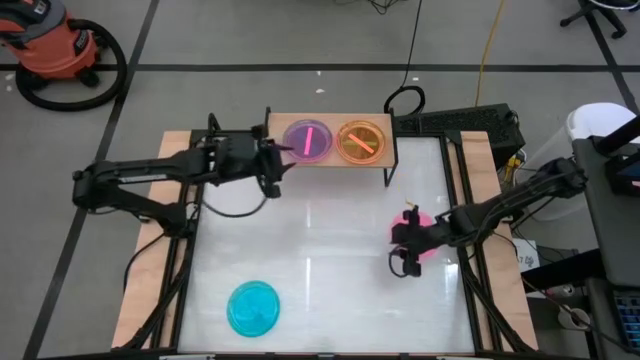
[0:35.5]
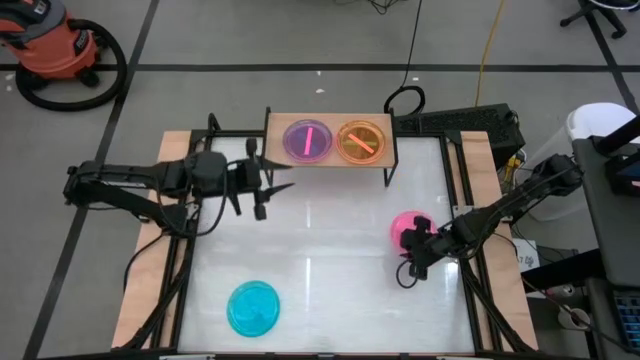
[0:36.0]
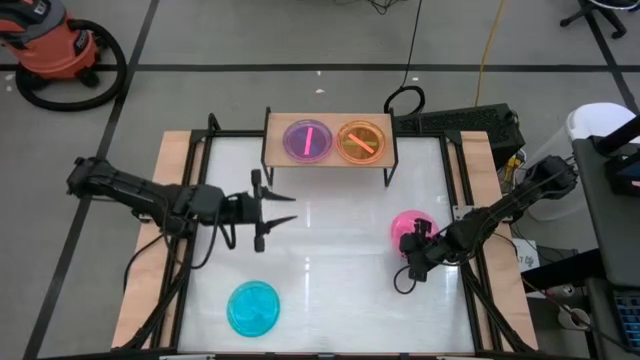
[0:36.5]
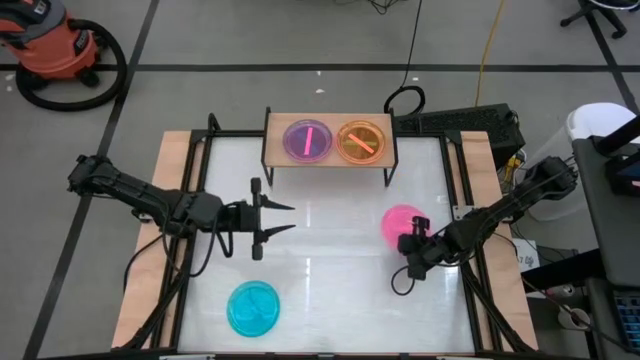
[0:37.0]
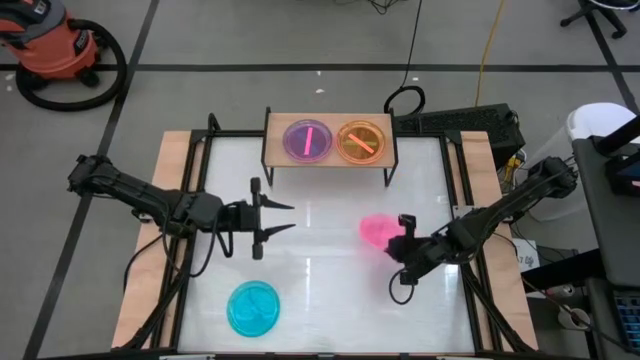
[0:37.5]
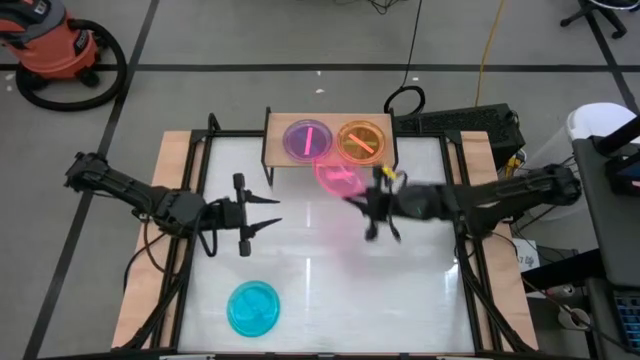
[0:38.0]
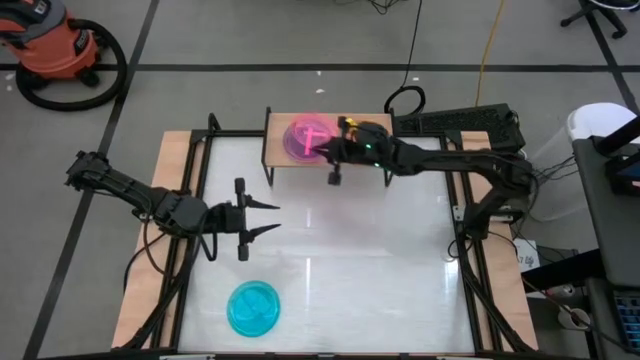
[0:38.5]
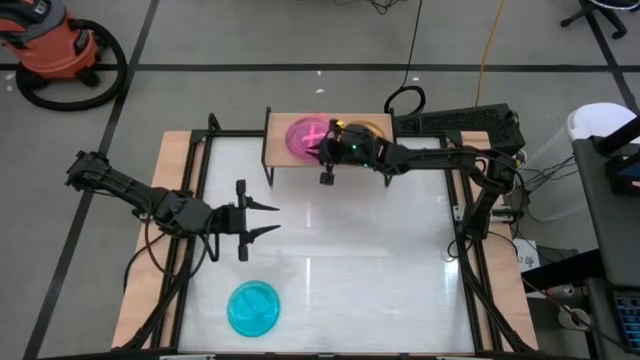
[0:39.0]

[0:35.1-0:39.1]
Task: Place and stack plates onto a shelf
Stack the pink plate on top of the pink plate on the shelf

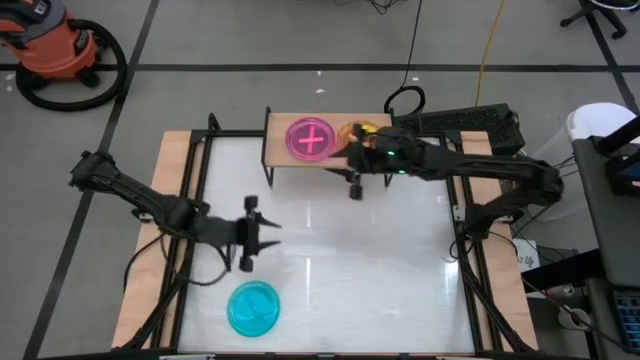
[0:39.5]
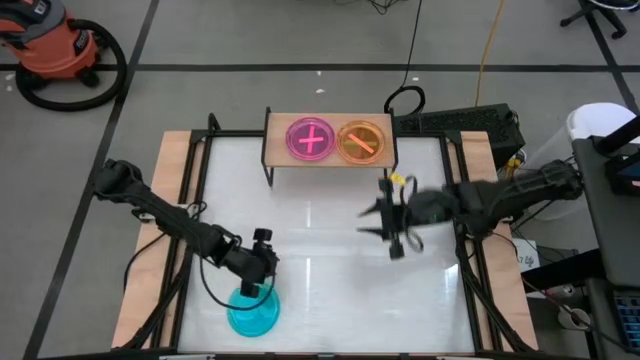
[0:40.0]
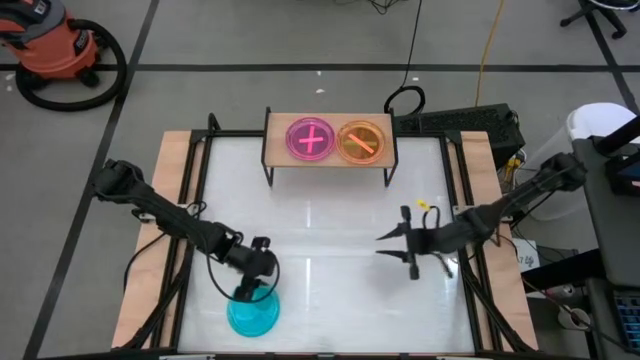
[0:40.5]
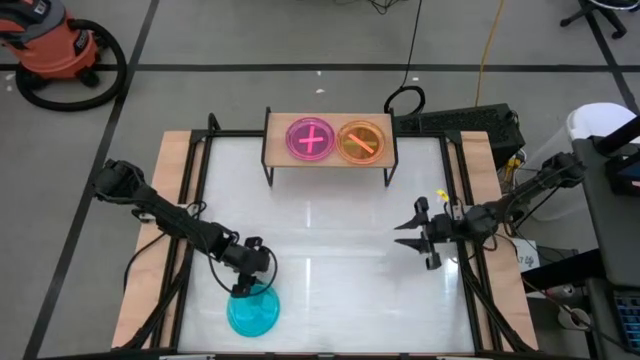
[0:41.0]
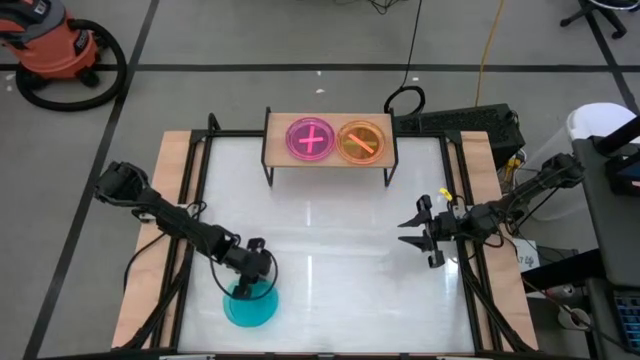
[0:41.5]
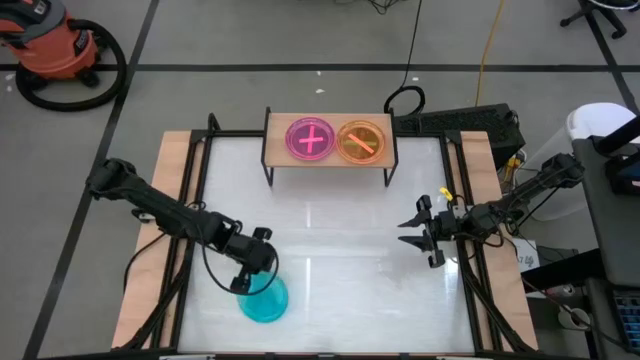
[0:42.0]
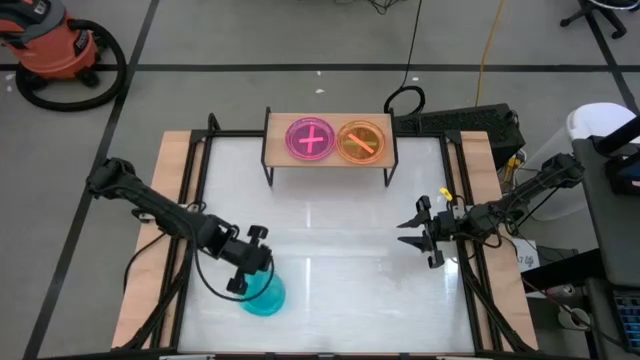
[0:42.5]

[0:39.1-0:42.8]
Stack the blue plate on top of the pink plate on the shelf

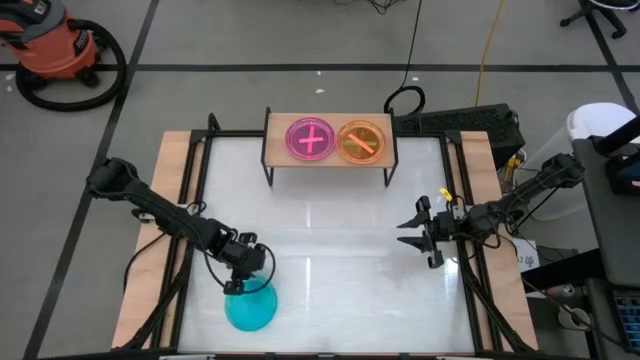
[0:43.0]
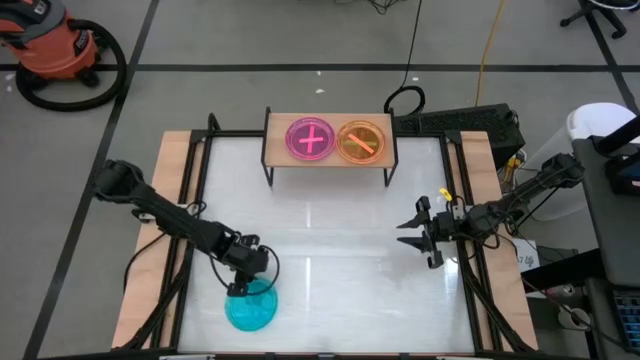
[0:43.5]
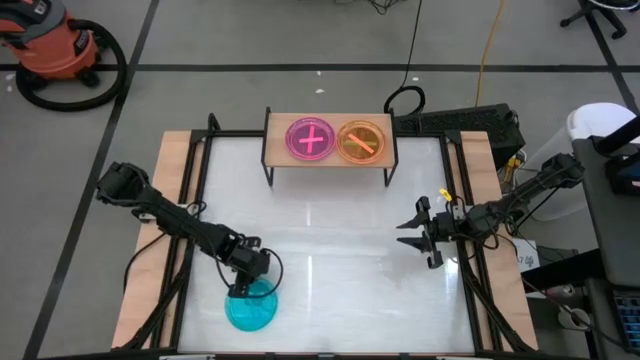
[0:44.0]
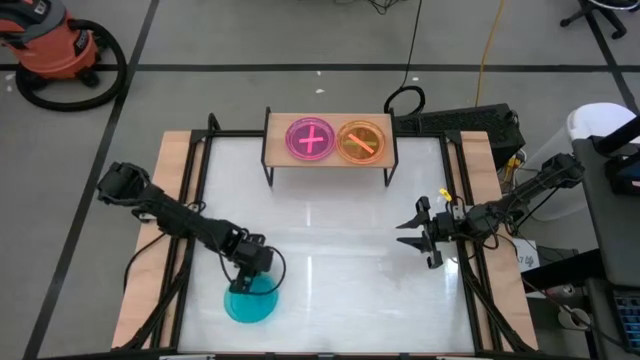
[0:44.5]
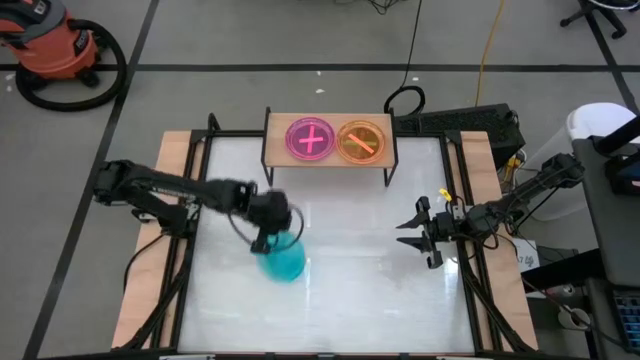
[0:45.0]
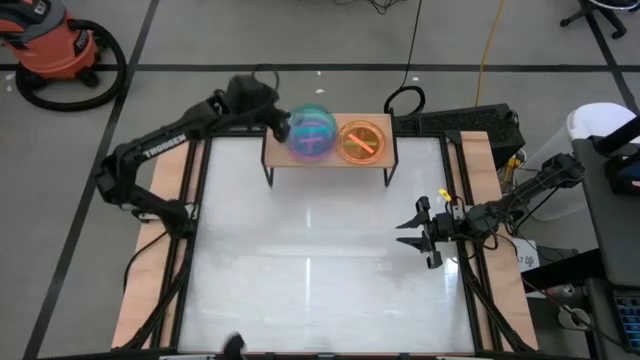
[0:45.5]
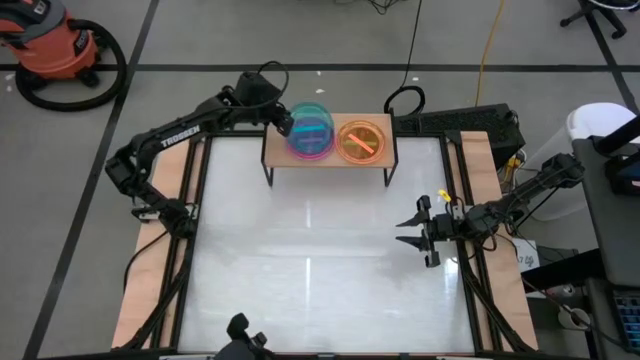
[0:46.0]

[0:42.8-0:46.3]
Stack the blue plate on top of the pink plate on the shelf

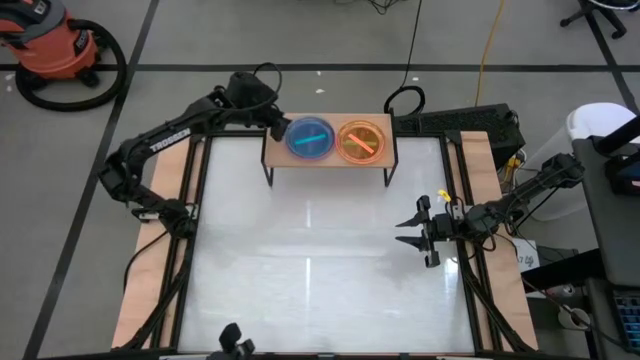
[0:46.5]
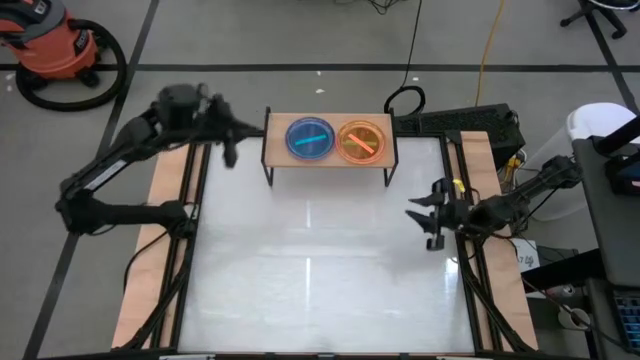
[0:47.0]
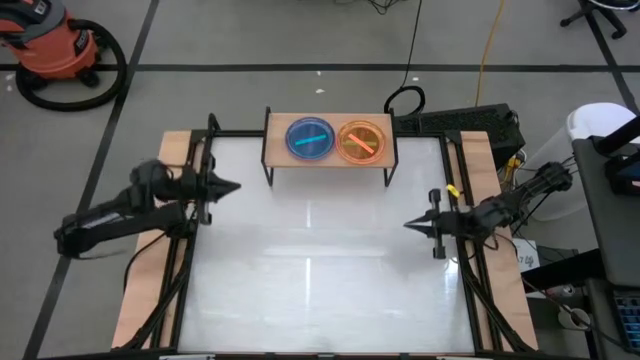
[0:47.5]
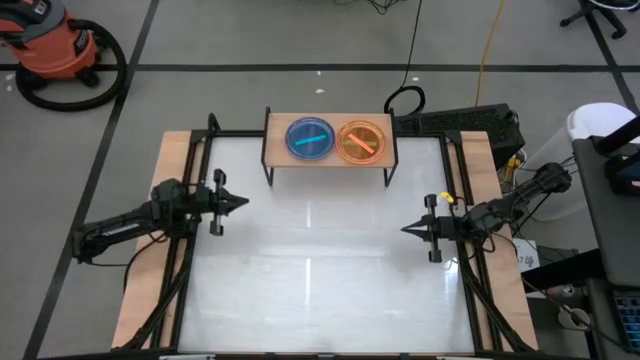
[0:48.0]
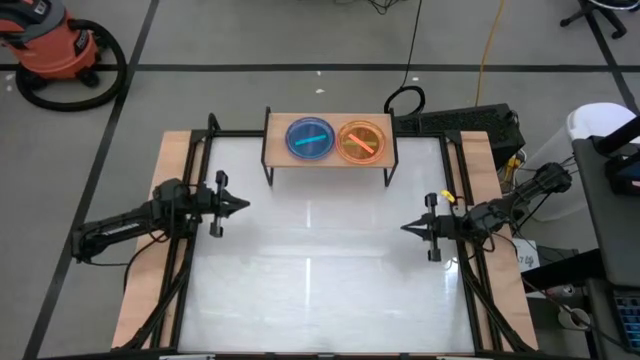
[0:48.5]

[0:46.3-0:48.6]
Return to Home Position

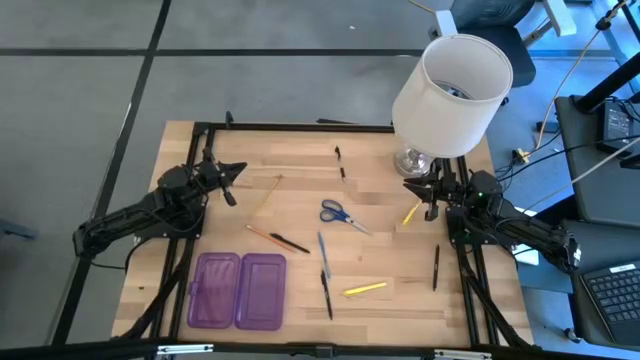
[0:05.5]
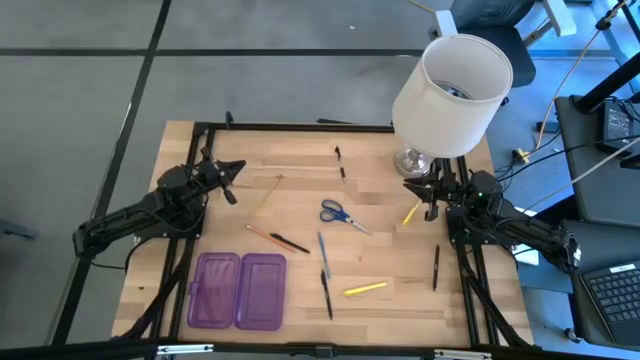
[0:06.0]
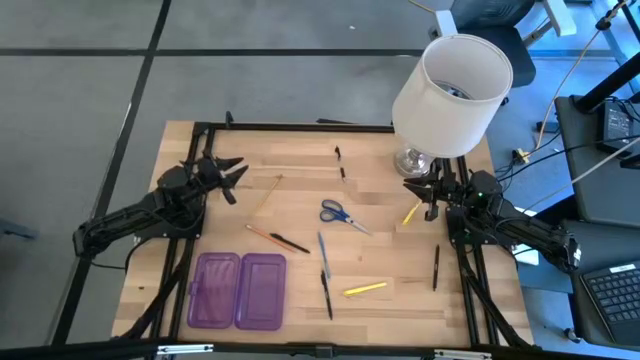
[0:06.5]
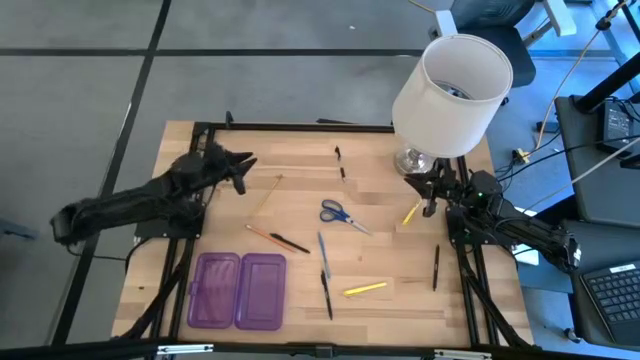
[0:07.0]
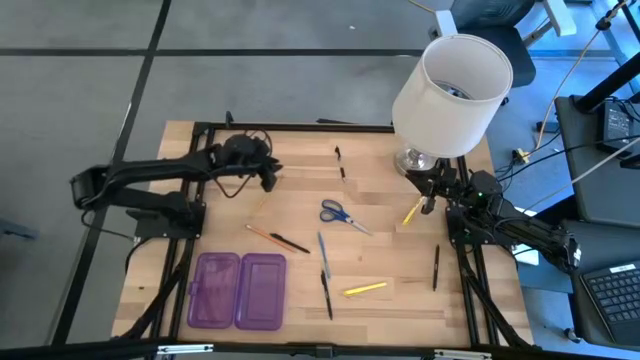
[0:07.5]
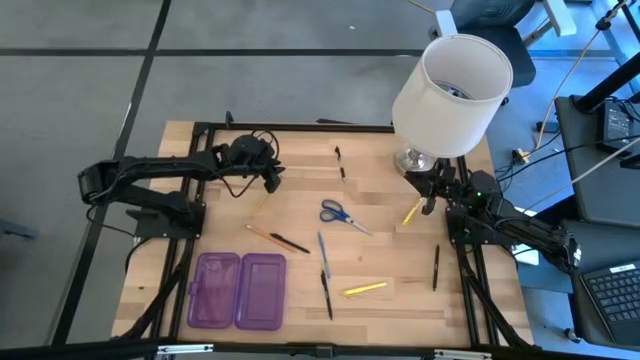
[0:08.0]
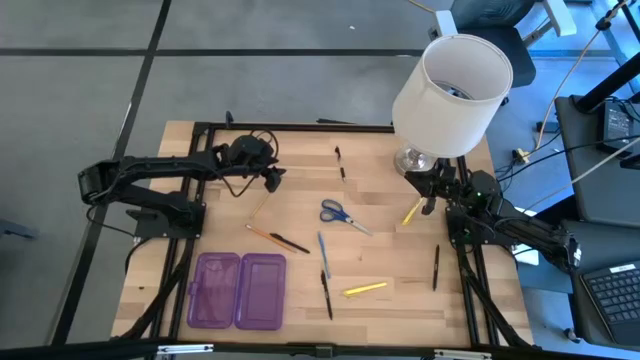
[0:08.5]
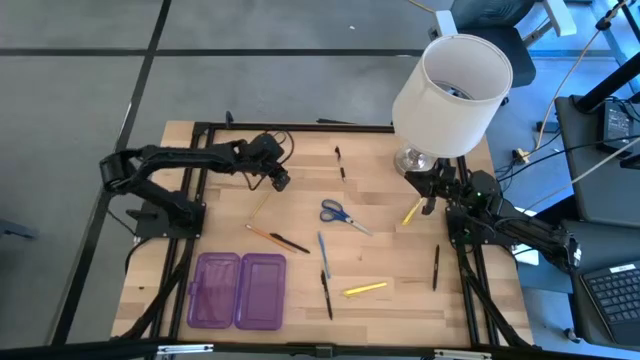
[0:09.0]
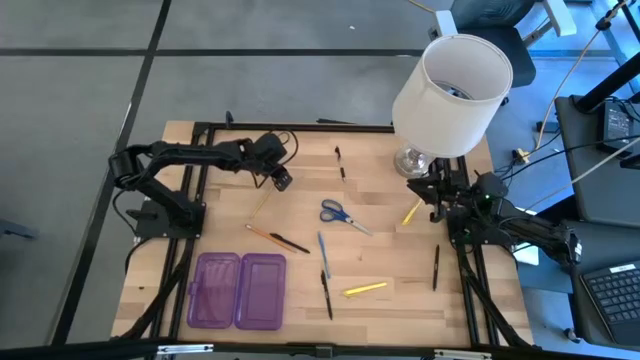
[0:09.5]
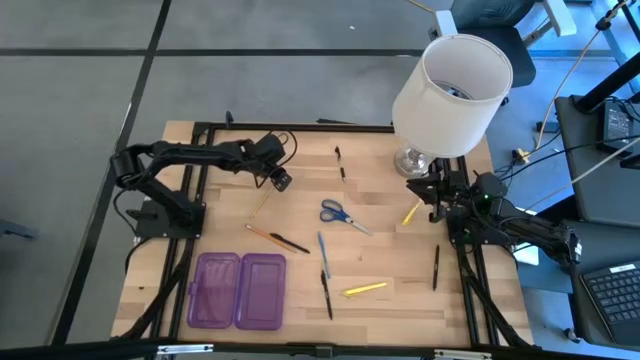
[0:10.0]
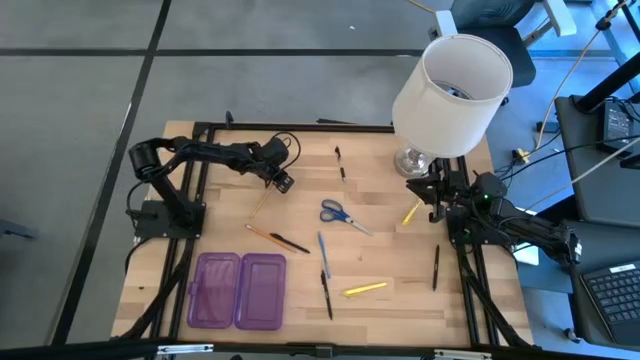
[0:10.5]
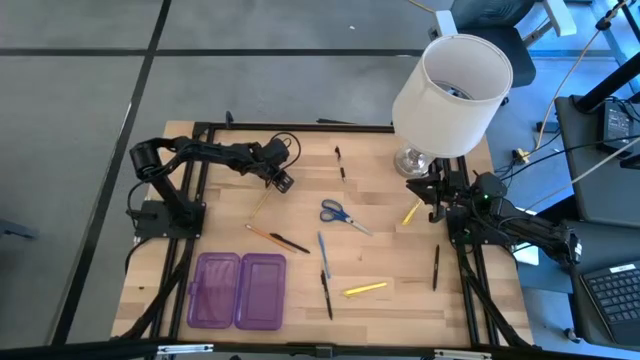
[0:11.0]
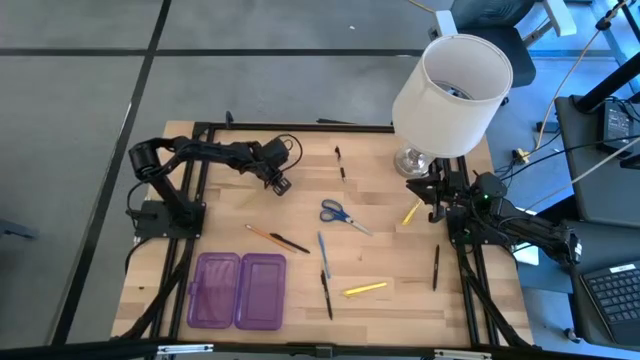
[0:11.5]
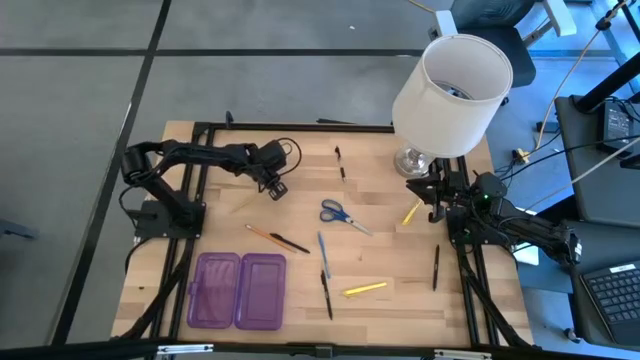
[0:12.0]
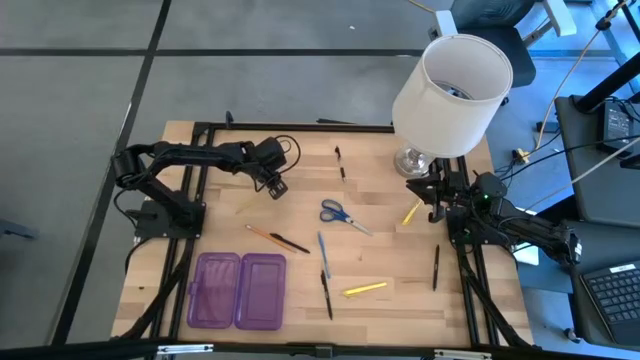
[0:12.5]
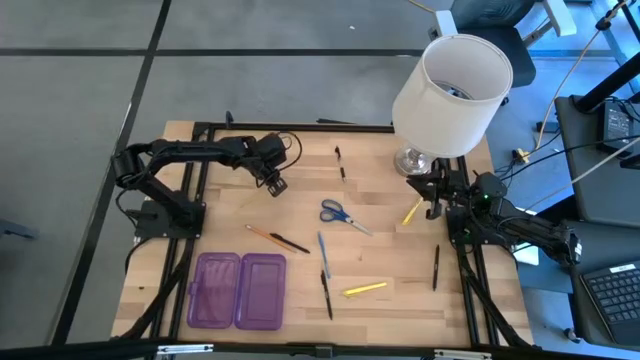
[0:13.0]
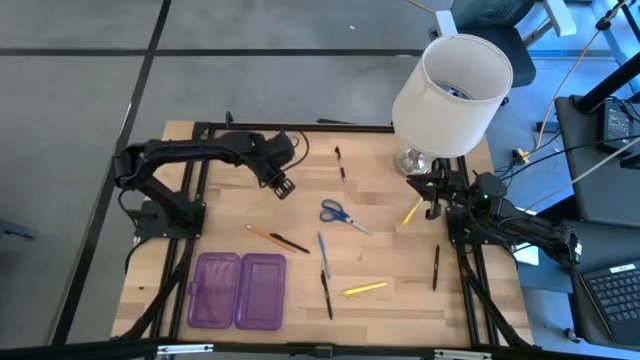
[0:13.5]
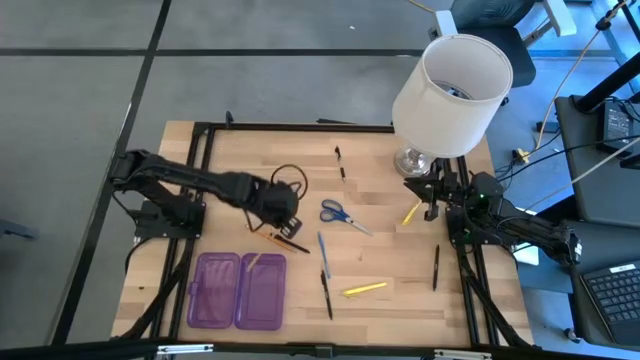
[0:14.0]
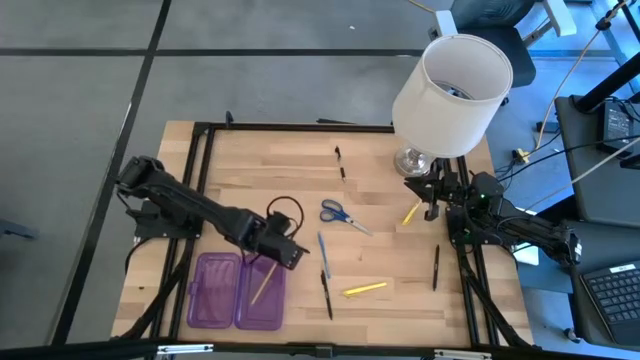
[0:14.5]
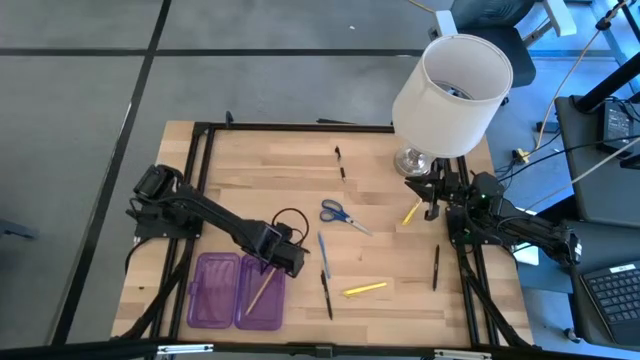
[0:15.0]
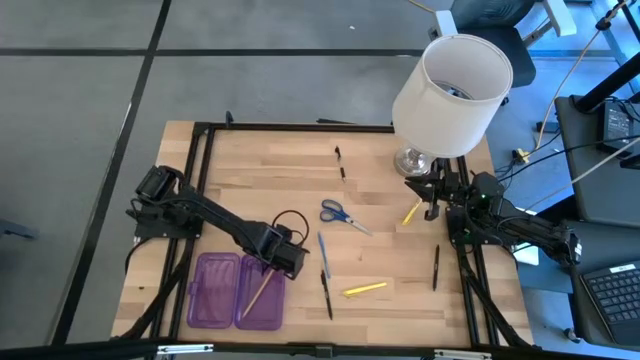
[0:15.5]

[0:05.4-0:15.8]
Task: Pick & place school supplies into a supply box
Put the yellow pencil into the violet box
